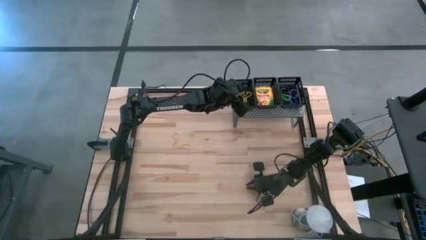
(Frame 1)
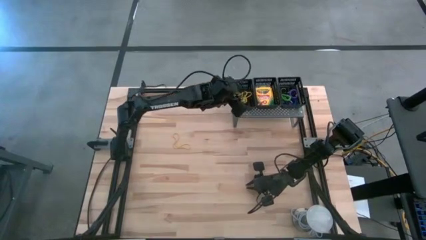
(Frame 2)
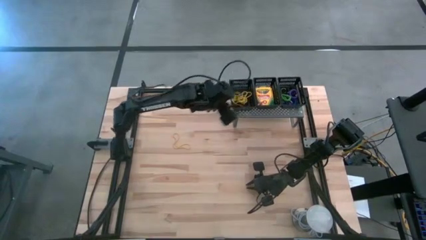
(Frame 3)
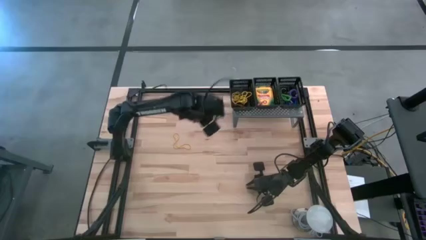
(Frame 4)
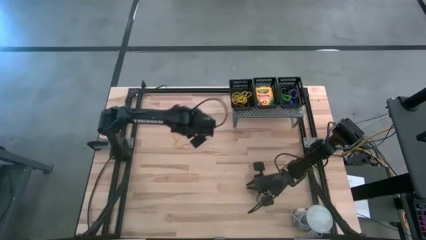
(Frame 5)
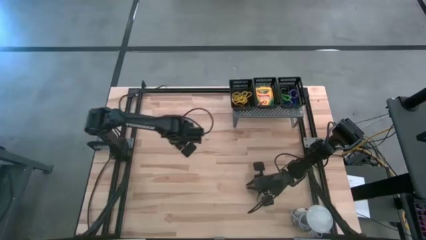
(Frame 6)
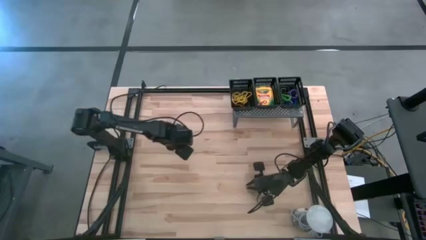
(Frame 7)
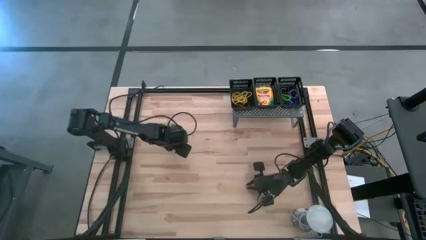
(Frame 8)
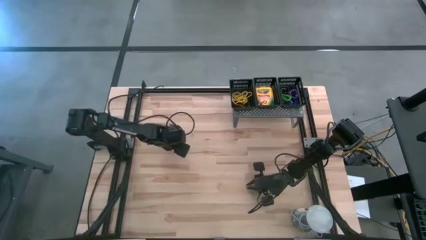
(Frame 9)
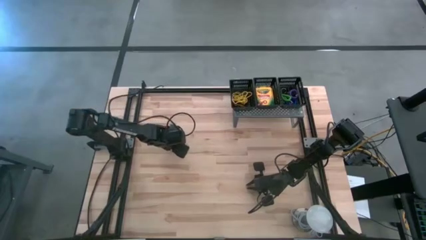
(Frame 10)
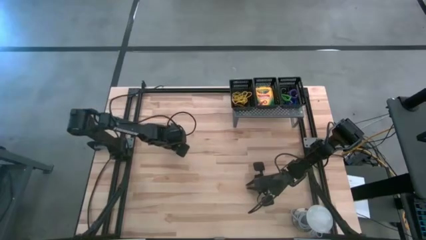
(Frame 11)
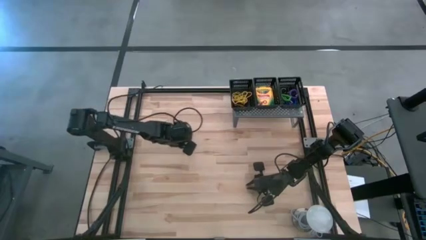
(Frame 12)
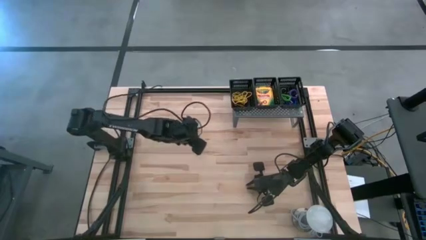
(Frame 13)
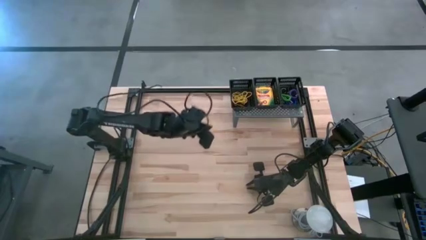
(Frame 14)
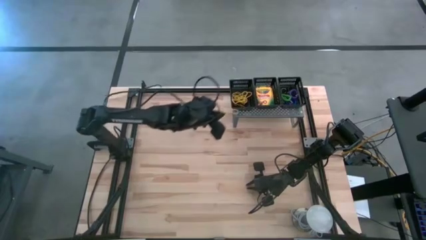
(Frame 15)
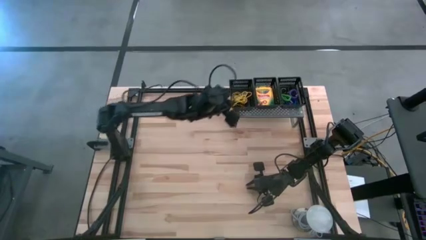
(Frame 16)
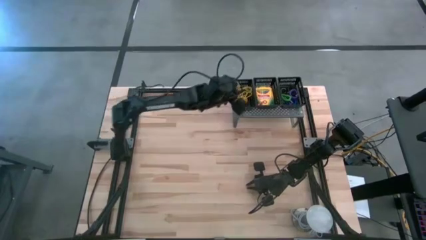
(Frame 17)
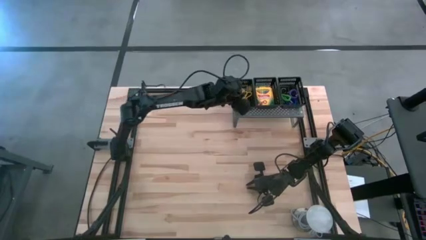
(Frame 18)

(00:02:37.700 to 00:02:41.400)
Task: Pick & Place Office Desk Supplies
Put the yellow rubber band into the left black basket on the shelf

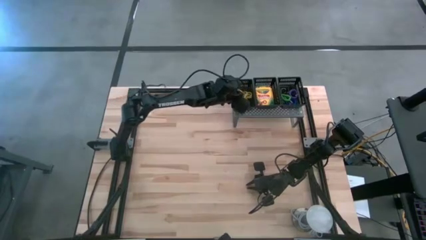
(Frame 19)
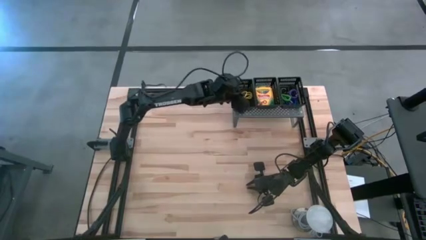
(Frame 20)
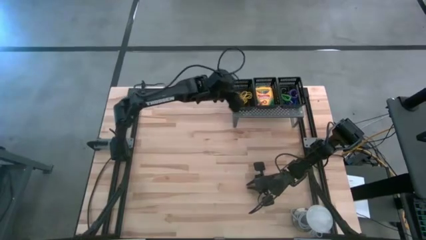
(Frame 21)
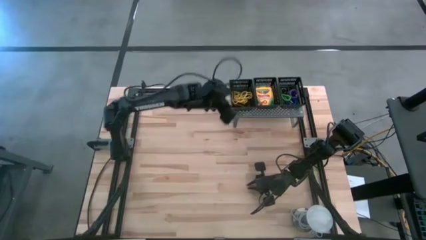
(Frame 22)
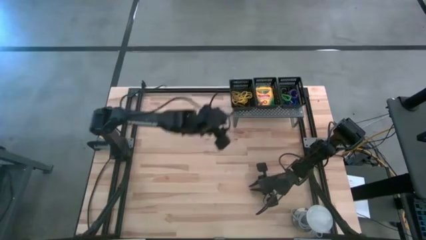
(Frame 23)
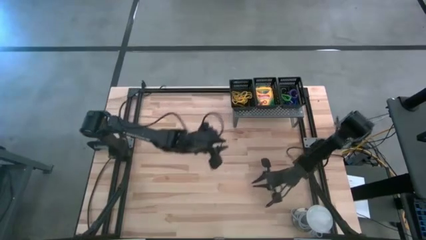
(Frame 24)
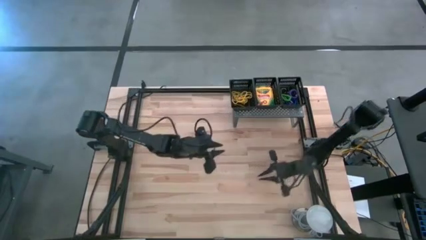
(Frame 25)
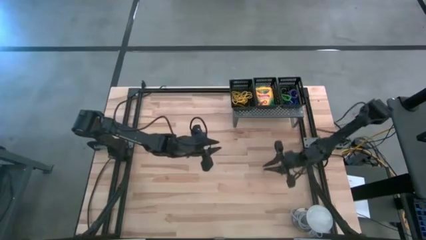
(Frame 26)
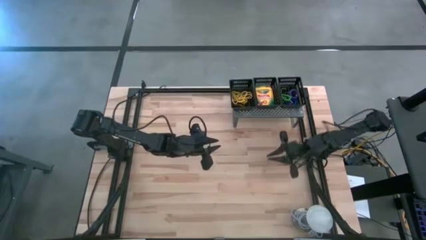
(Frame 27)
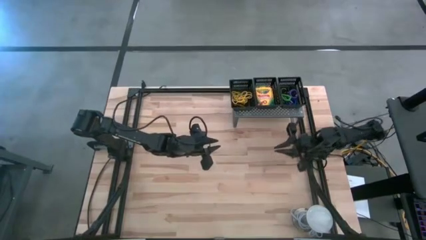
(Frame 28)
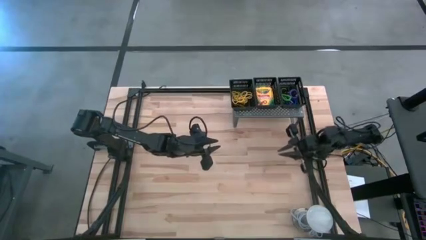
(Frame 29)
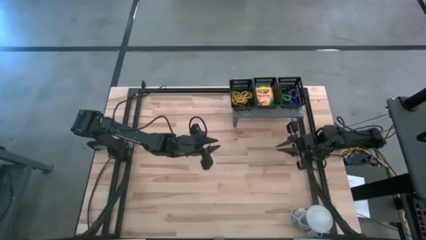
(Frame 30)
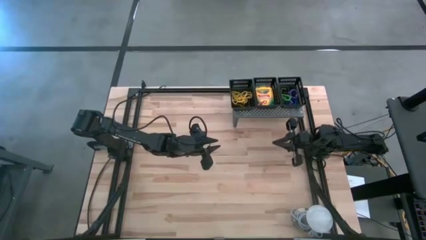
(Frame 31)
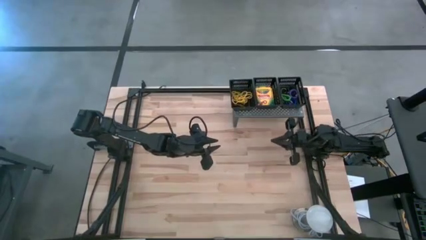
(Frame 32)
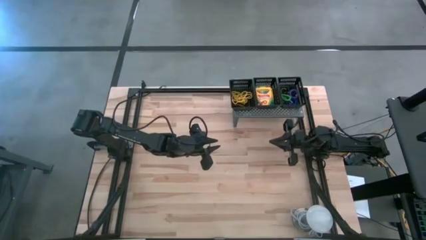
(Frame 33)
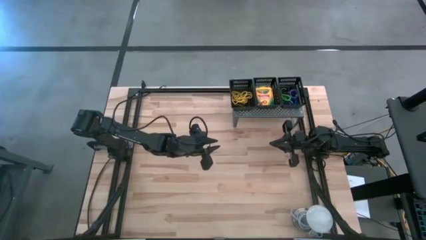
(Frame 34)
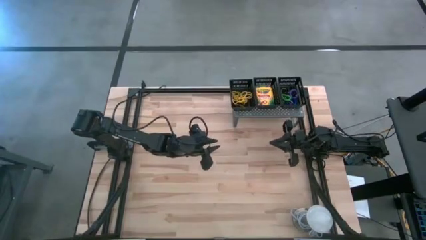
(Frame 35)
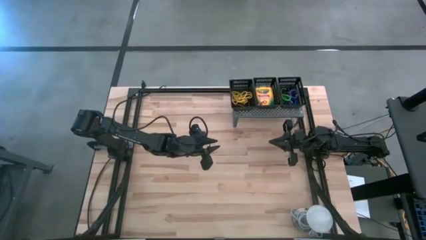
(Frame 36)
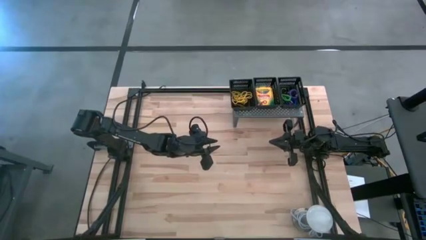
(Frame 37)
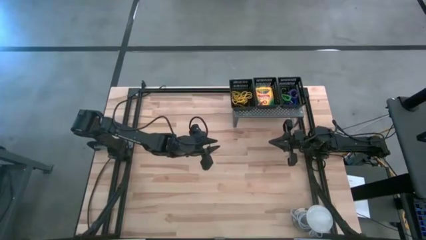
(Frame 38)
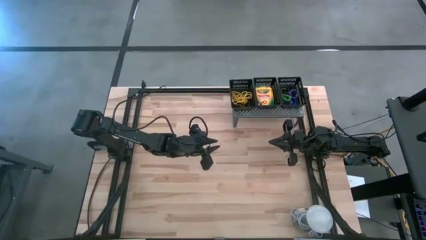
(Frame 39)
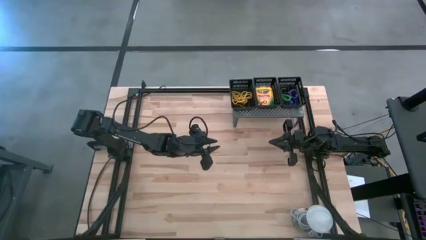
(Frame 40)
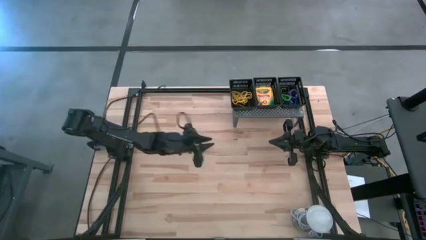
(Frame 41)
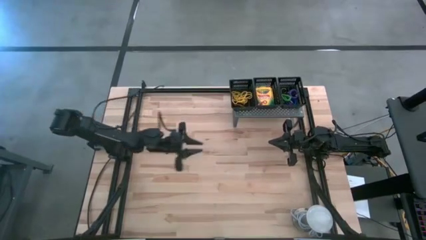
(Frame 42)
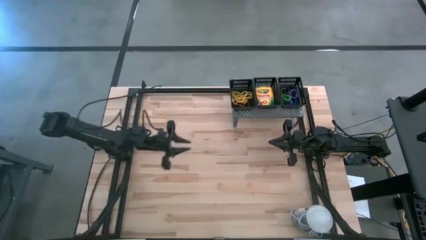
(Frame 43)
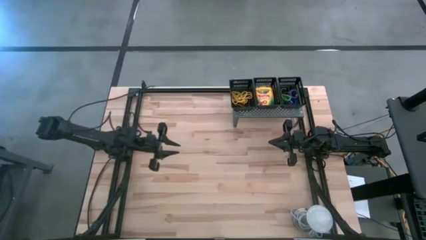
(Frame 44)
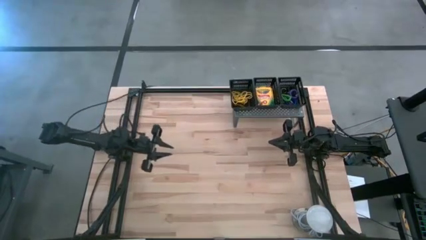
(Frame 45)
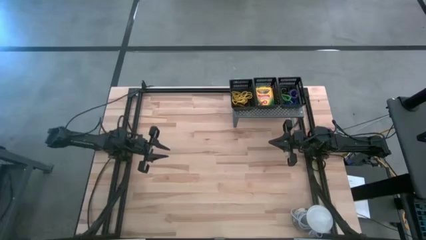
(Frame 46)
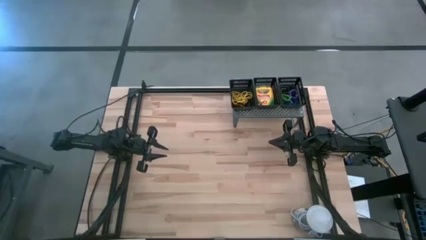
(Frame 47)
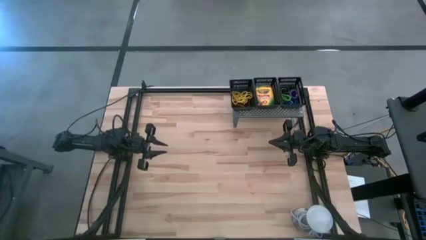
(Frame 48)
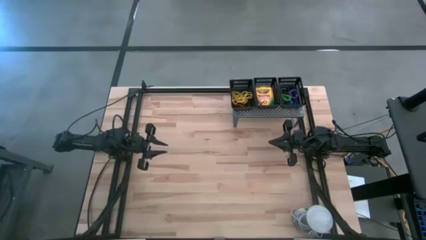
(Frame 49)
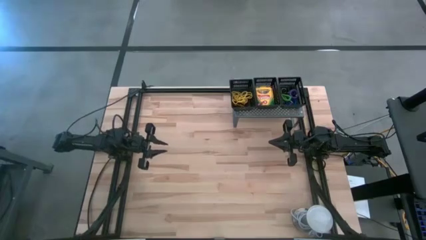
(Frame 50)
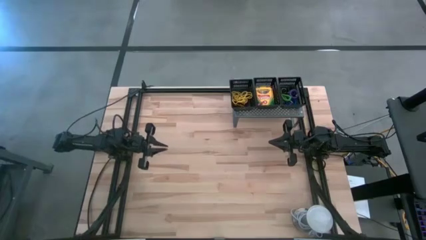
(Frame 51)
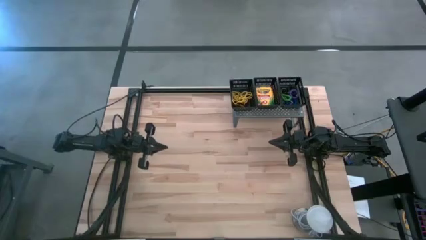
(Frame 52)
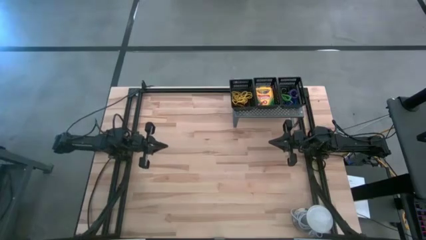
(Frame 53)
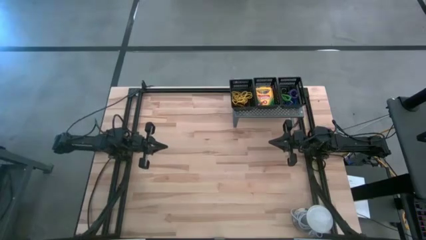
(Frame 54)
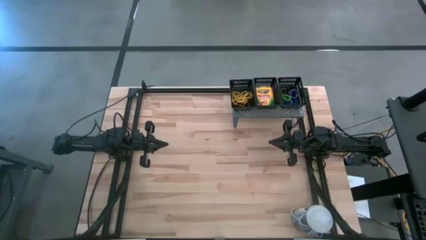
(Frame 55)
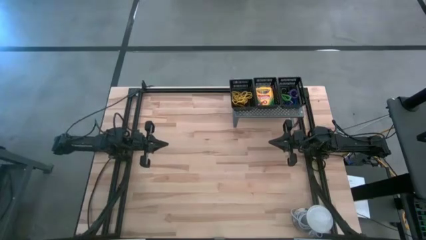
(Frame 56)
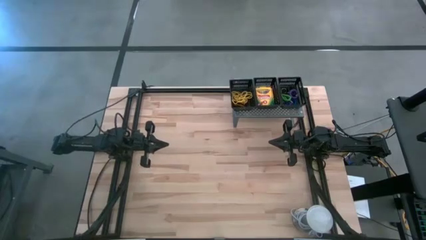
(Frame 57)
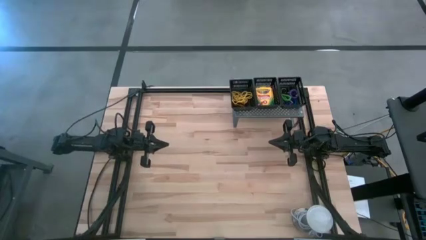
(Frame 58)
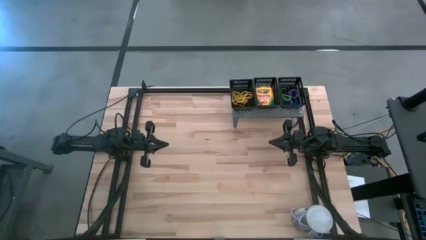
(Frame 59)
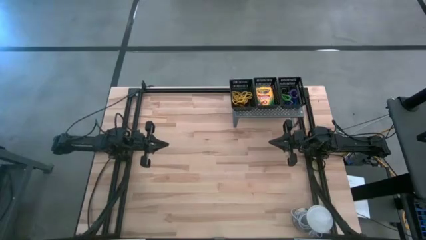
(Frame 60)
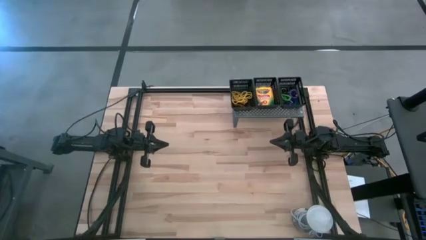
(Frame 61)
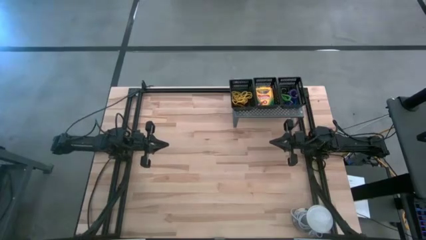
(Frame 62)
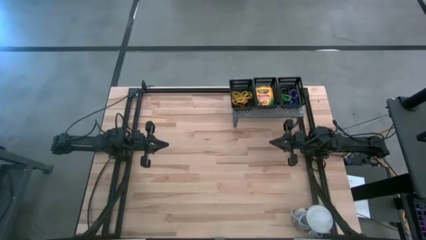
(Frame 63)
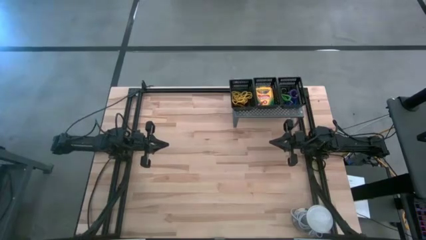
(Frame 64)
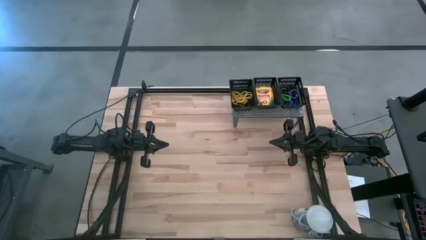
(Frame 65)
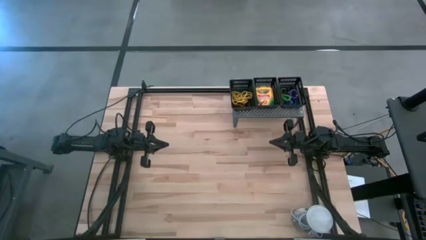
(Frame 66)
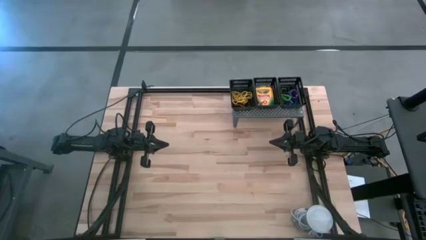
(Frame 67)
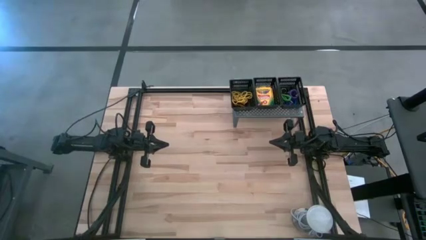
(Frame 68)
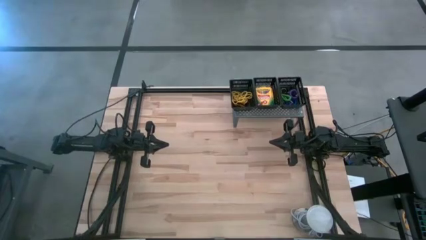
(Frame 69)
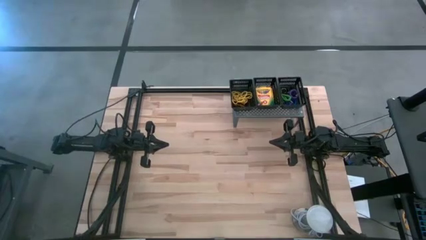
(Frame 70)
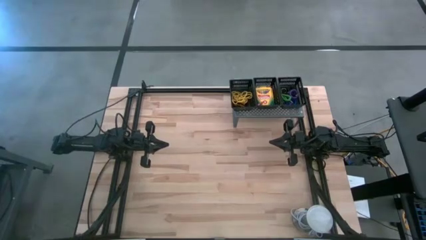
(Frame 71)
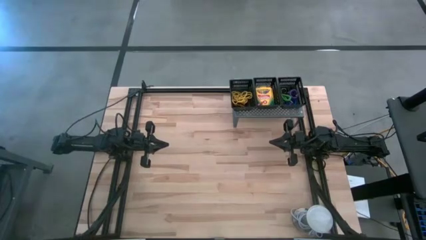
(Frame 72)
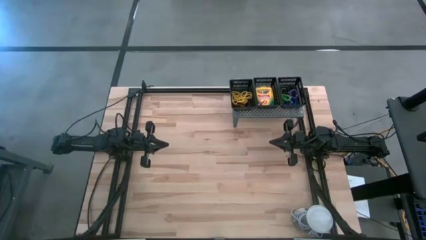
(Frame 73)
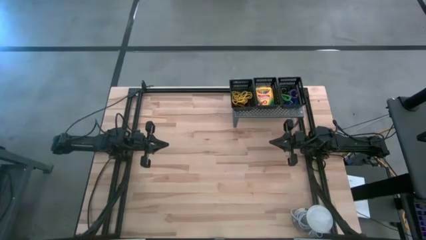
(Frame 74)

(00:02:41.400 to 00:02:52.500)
Return to Home Position
